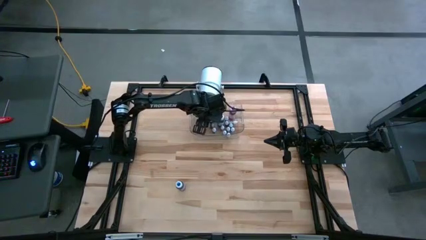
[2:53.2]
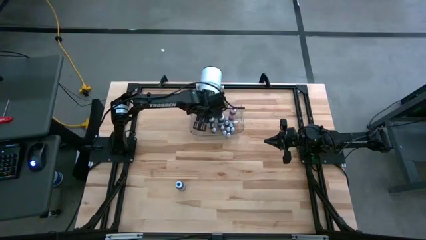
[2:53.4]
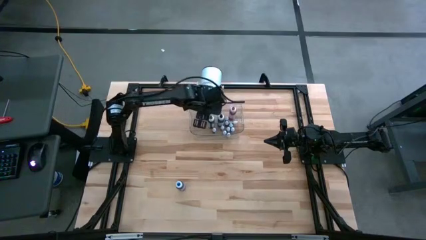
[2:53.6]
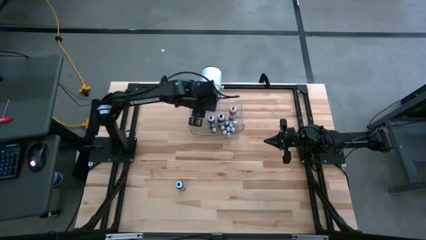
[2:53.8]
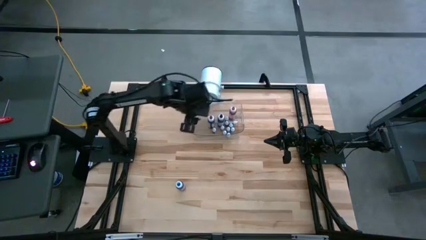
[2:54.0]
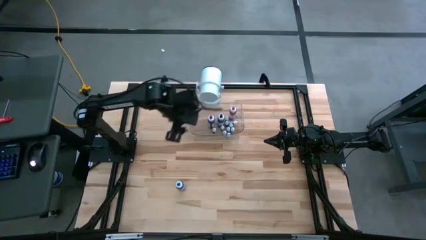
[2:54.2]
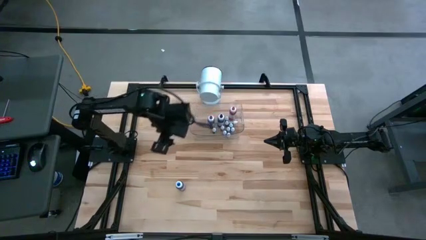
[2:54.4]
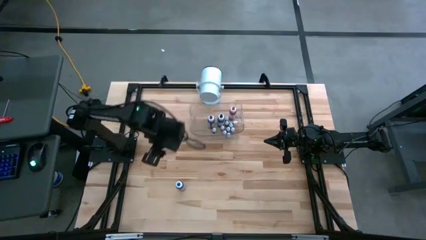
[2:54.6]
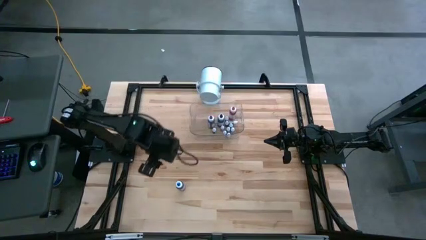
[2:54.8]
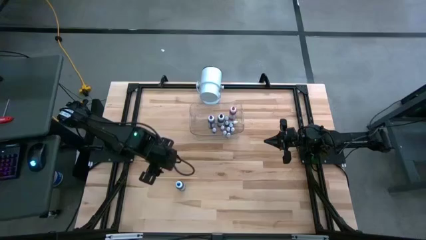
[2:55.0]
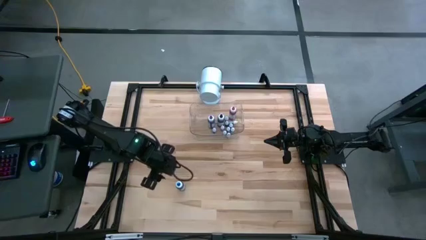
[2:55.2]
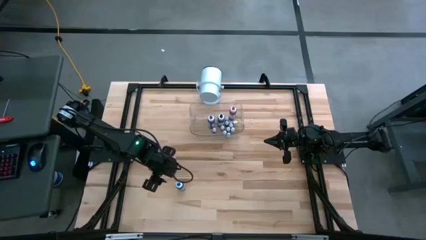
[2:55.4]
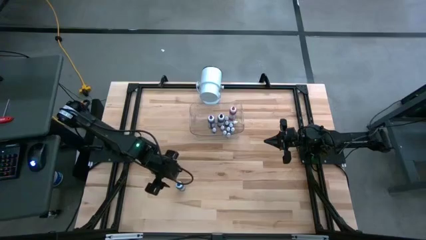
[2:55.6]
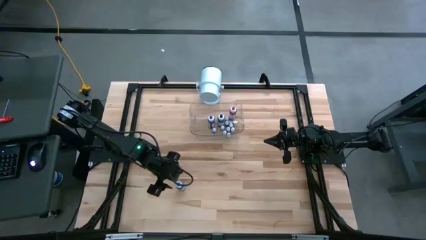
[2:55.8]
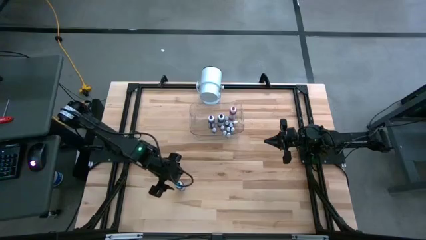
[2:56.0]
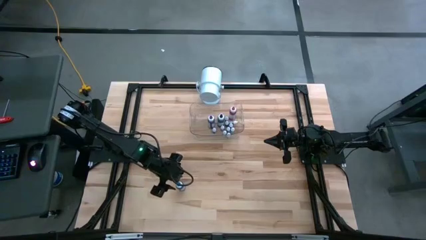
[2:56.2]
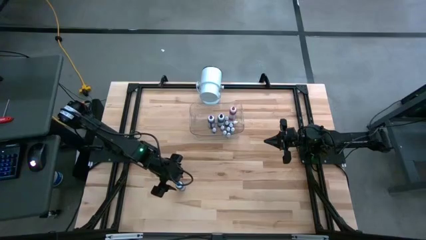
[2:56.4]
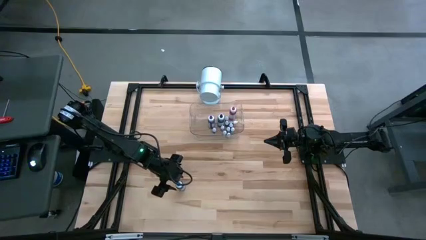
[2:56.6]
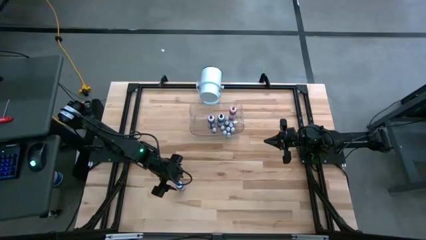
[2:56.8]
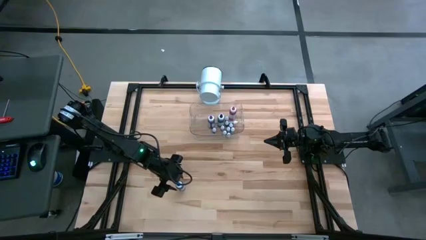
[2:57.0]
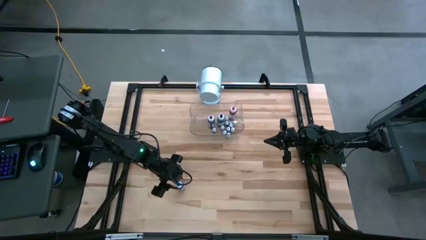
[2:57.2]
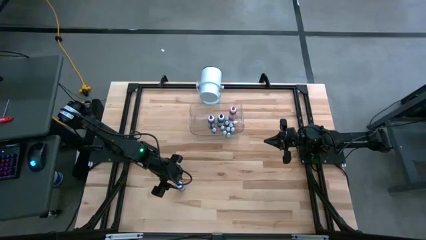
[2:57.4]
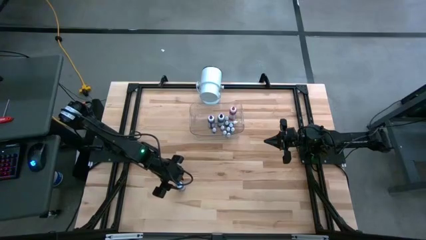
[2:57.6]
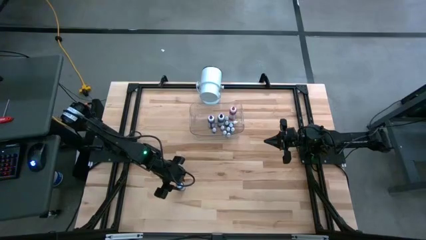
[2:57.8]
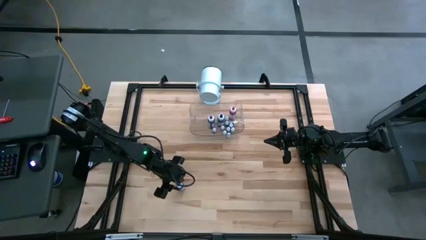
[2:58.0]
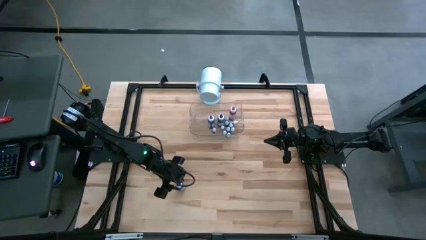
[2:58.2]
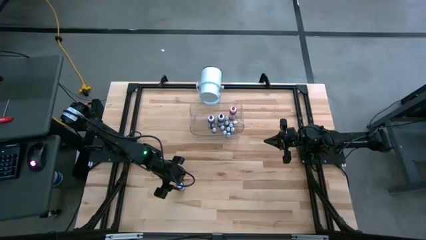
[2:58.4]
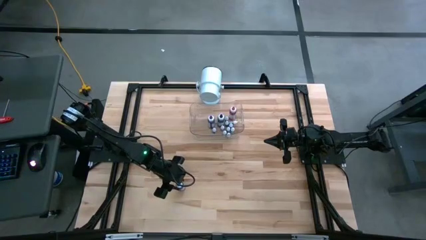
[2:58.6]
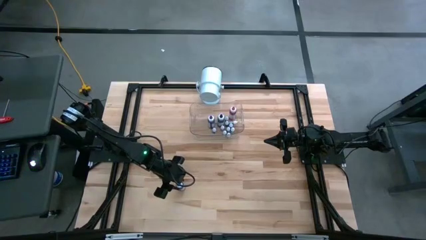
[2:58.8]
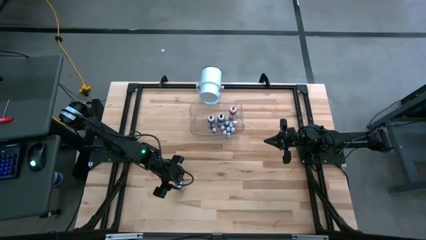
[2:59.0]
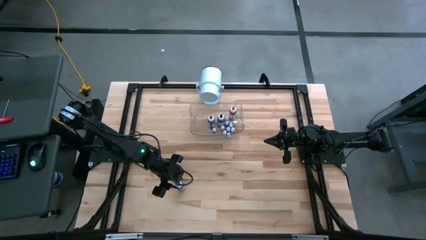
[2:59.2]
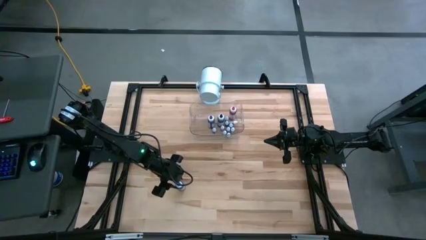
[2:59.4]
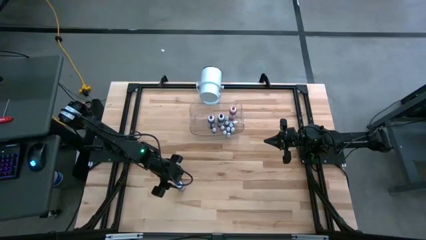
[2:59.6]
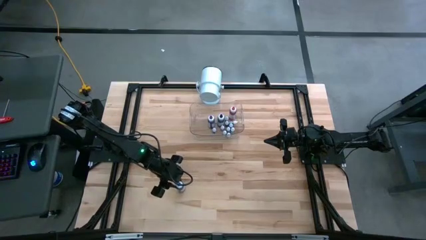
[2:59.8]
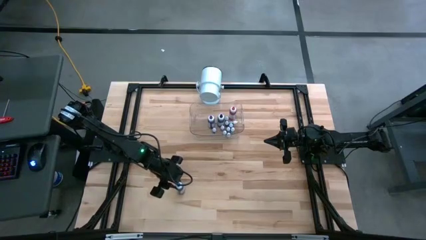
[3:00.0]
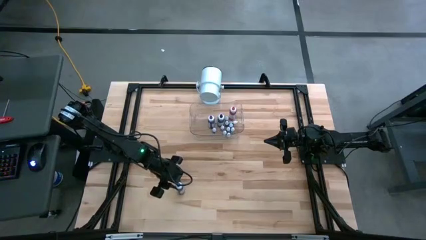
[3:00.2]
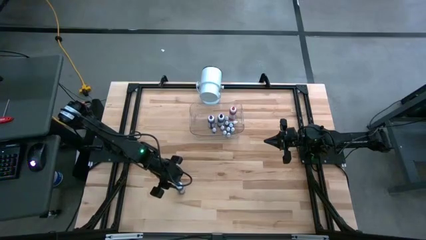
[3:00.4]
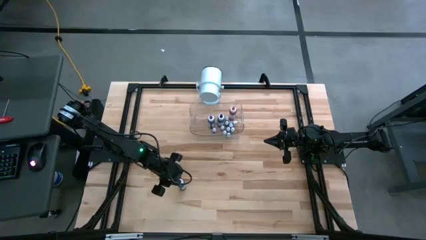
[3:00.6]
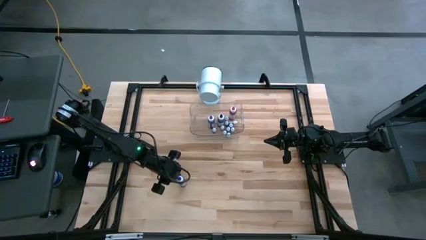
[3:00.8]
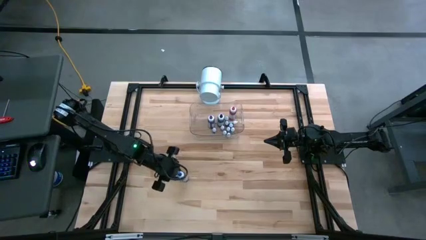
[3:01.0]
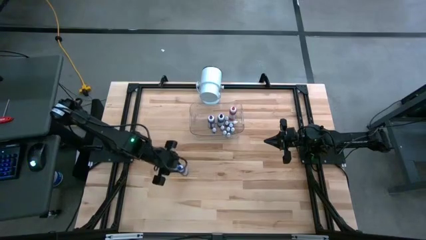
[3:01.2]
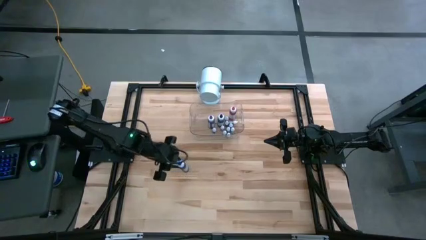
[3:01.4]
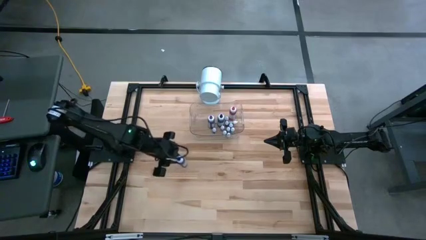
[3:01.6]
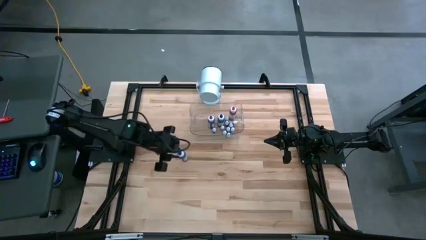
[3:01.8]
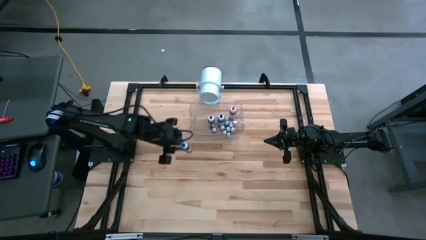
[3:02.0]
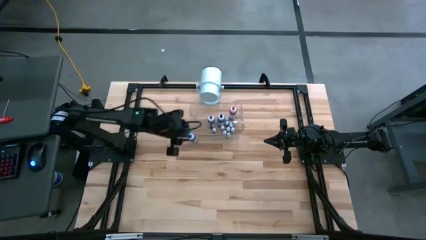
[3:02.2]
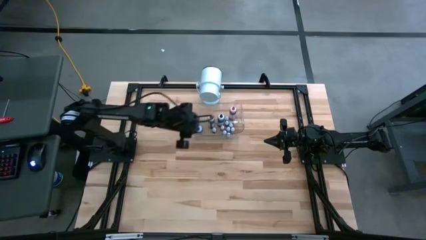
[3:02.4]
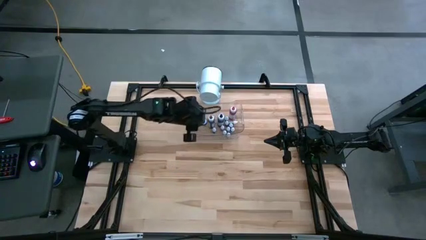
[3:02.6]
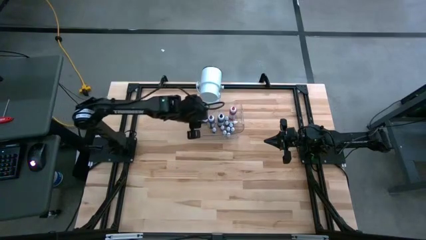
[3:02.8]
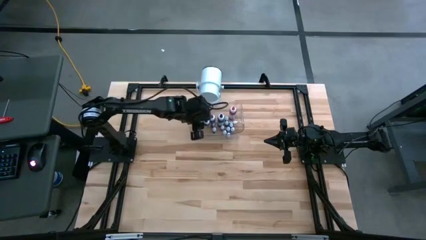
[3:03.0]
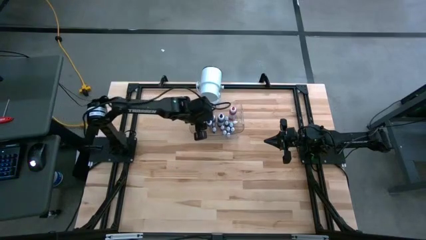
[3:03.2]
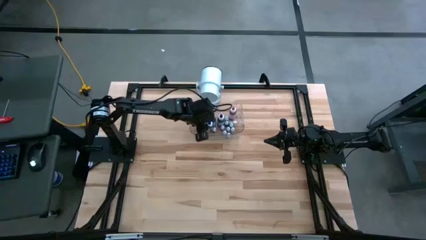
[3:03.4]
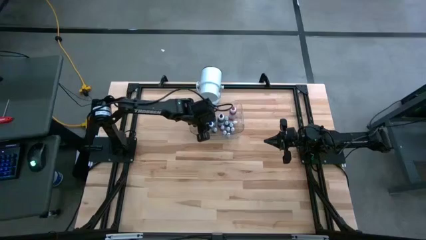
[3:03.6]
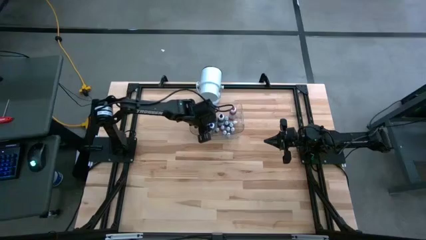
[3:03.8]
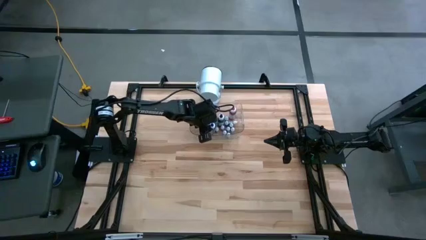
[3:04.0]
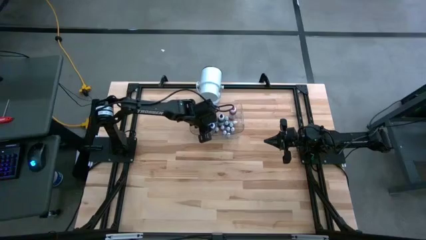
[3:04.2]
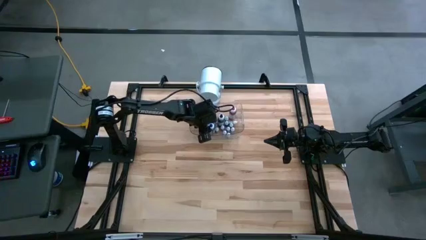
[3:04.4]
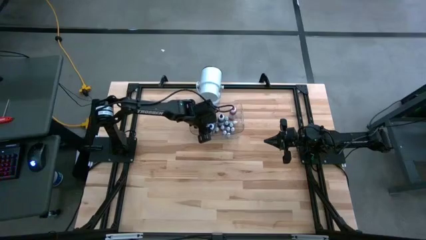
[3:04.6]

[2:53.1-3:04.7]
Task: Pick & Place food coloring
Put the large blue food coloring bottle into the transparent bin

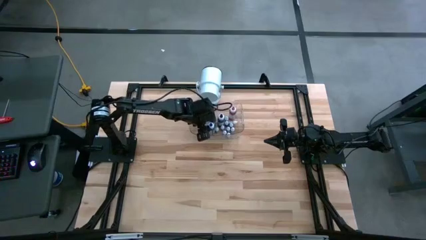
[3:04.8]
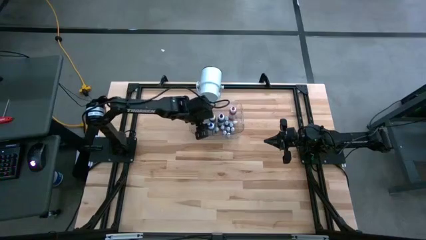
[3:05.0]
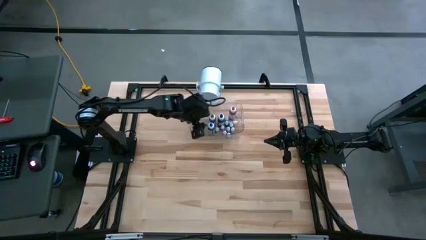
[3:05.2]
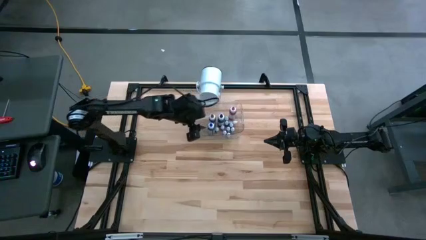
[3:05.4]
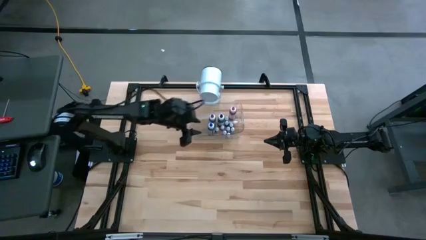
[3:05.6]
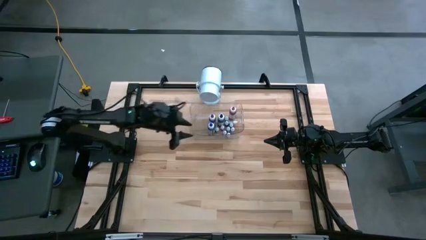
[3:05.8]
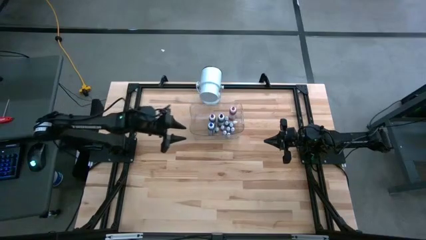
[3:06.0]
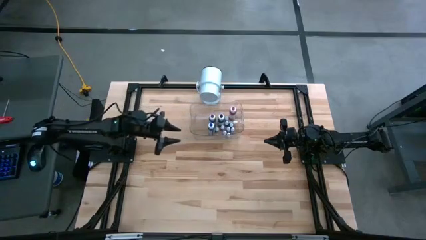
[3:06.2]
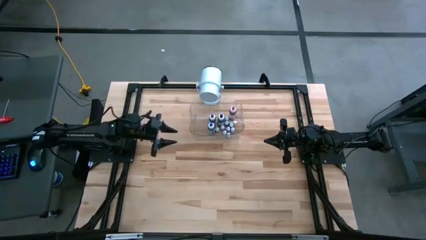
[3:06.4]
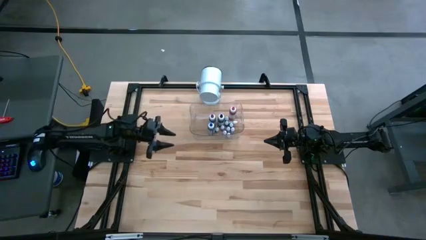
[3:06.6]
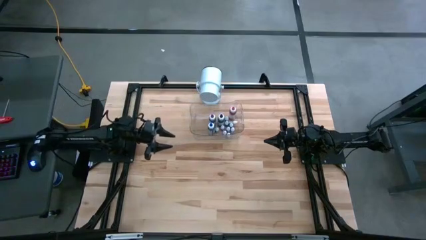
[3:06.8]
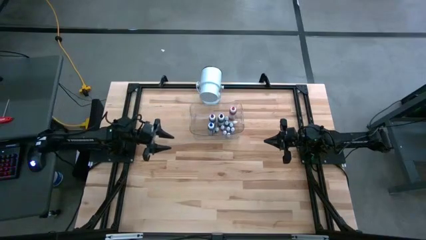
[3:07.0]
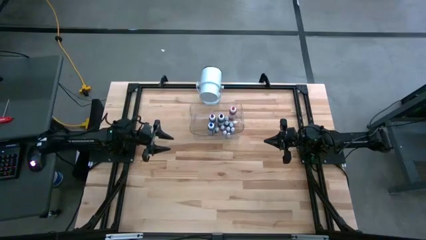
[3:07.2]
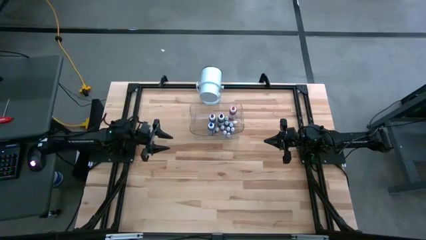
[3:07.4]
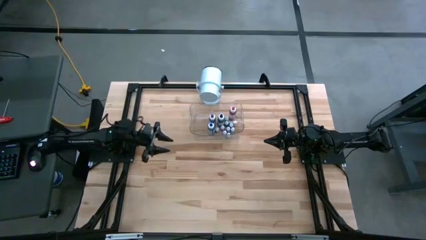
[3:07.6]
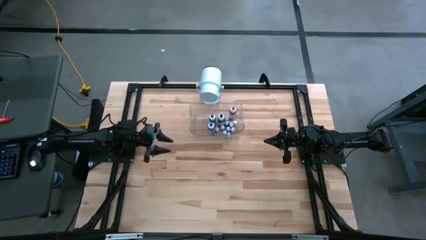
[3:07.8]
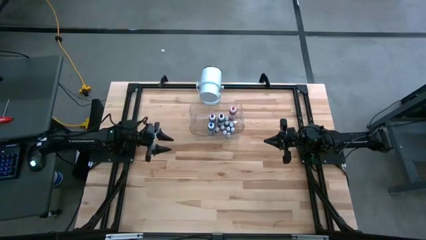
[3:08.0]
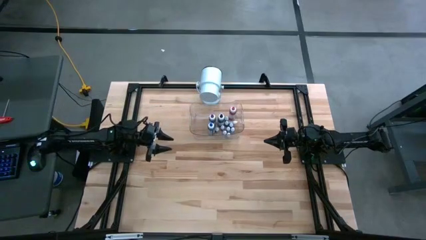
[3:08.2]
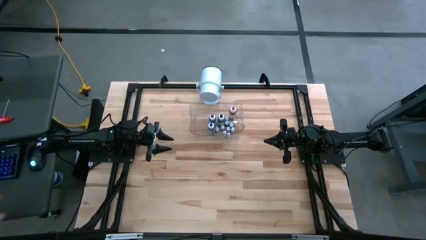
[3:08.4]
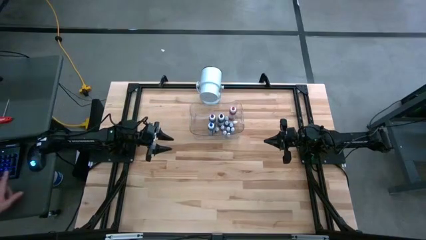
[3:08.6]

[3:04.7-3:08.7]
Return to Home Position

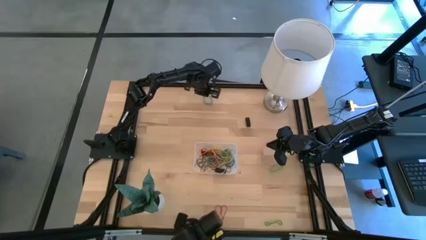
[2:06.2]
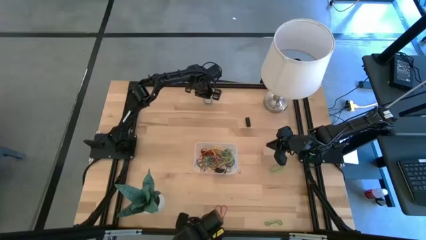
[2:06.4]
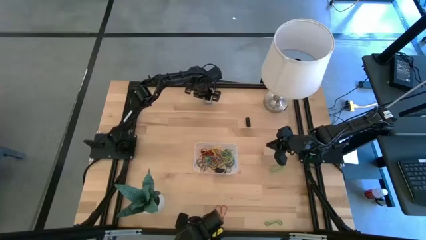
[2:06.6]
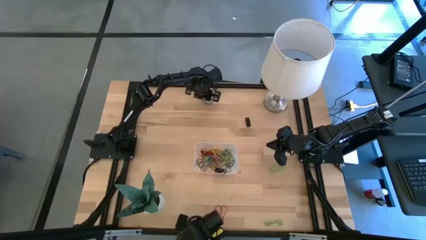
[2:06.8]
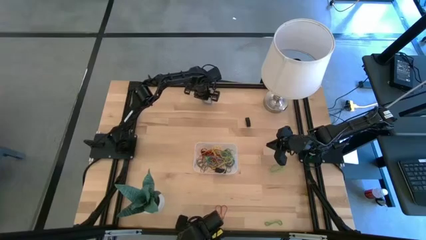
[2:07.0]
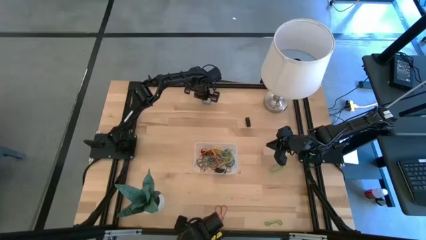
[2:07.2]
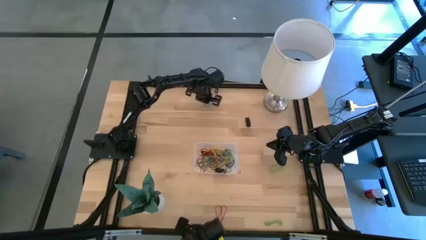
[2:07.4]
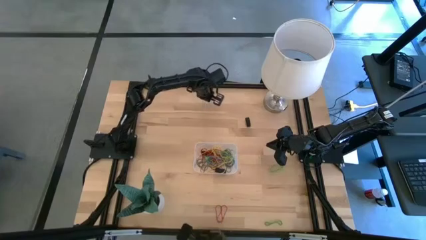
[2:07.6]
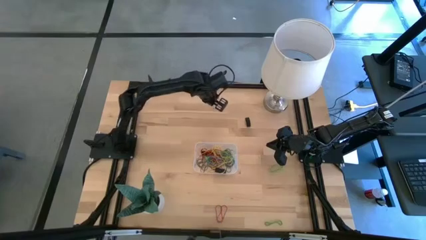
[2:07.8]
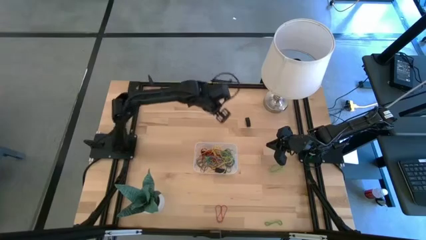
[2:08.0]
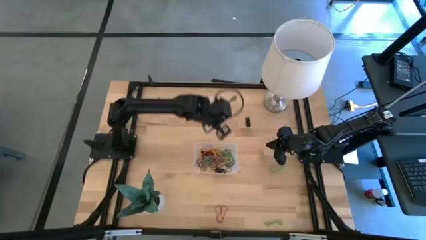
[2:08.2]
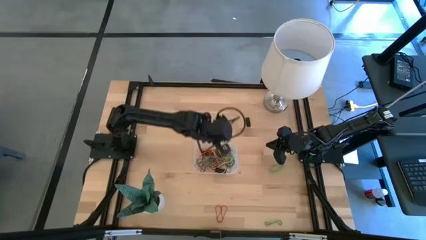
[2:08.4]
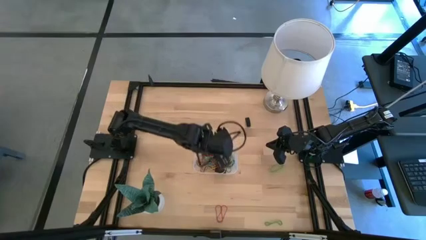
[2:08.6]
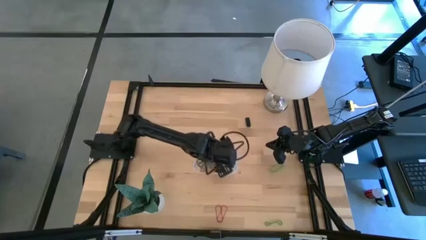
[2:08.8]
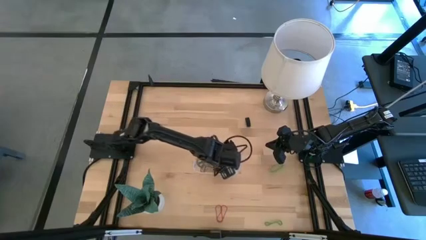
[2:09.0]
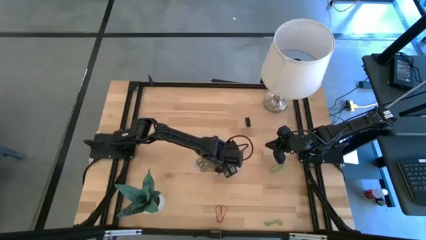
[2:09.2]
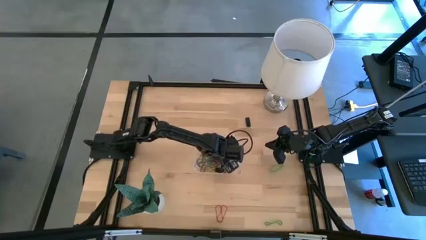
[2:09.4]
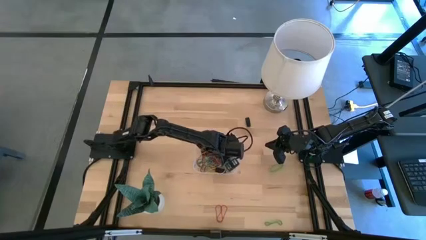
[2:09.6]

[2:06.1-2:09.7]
Task: Pick and place rubber bands into bin
Put the blue rubber band into the transparent bin
